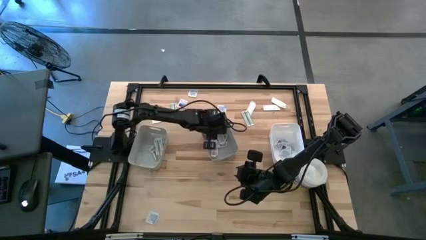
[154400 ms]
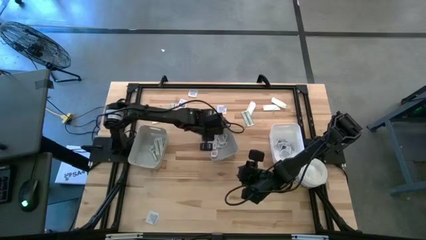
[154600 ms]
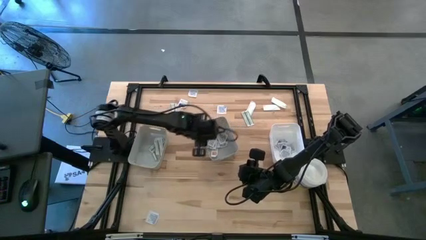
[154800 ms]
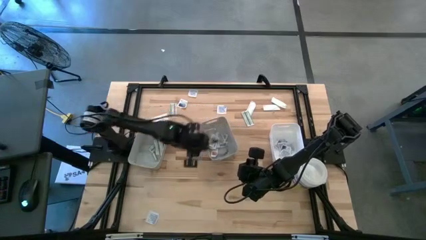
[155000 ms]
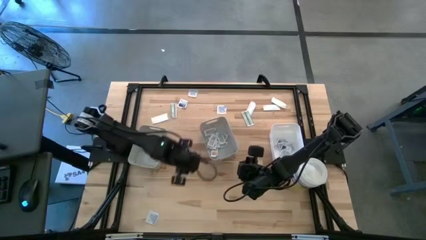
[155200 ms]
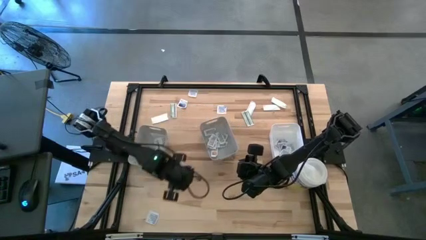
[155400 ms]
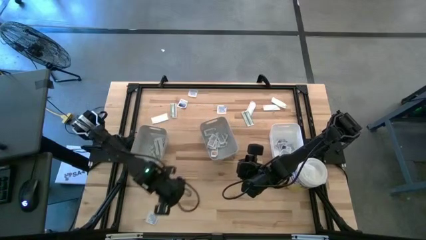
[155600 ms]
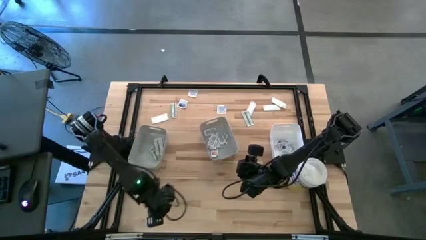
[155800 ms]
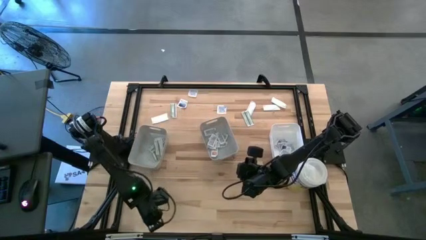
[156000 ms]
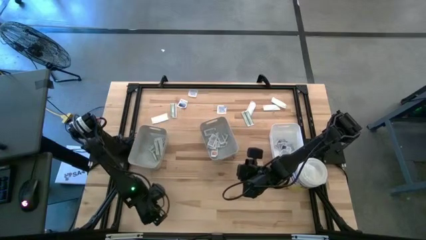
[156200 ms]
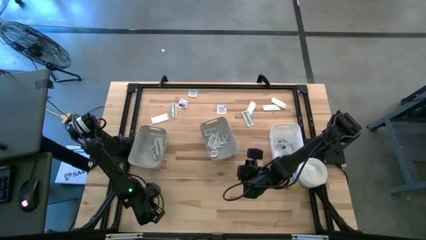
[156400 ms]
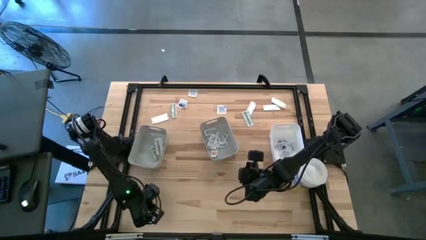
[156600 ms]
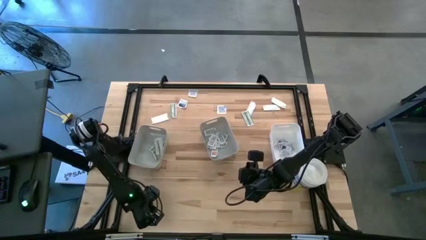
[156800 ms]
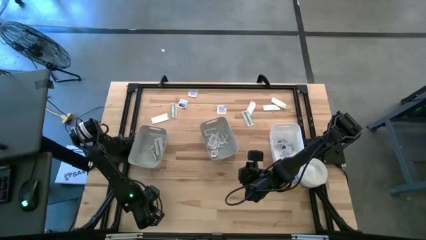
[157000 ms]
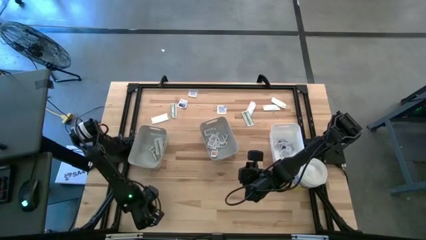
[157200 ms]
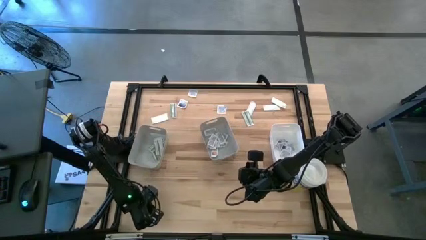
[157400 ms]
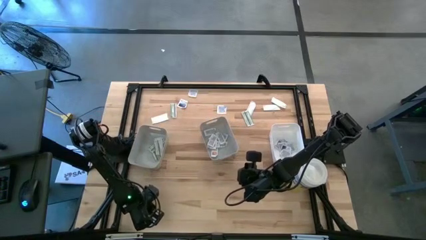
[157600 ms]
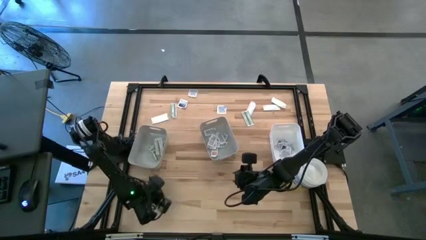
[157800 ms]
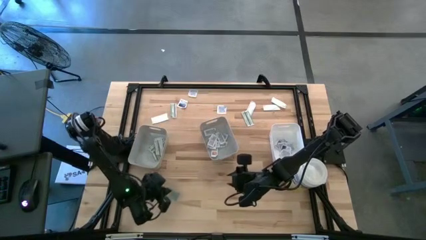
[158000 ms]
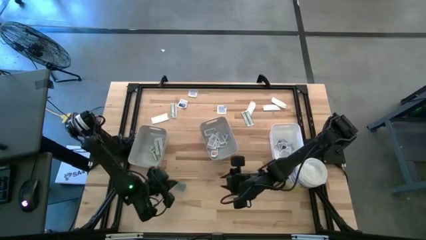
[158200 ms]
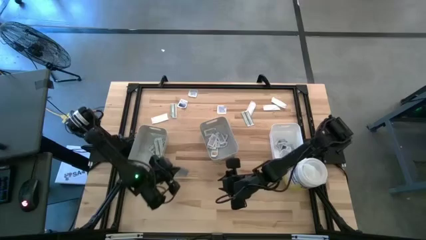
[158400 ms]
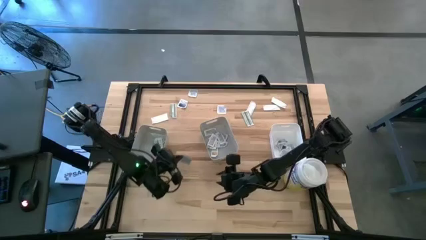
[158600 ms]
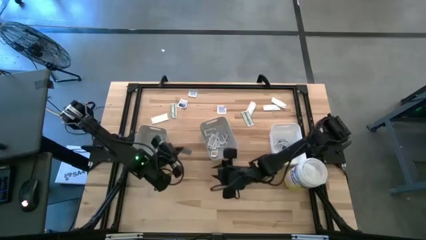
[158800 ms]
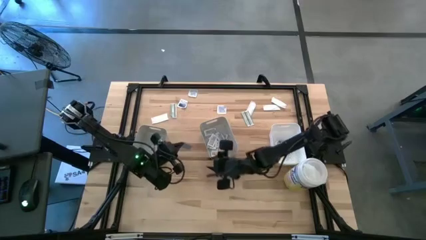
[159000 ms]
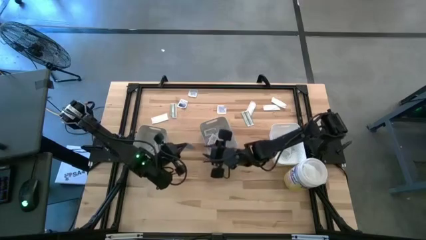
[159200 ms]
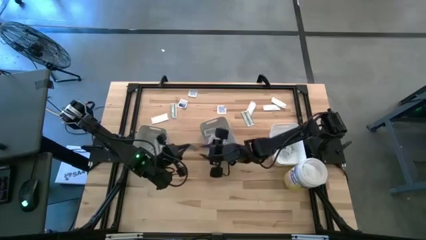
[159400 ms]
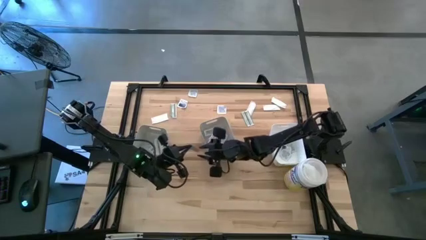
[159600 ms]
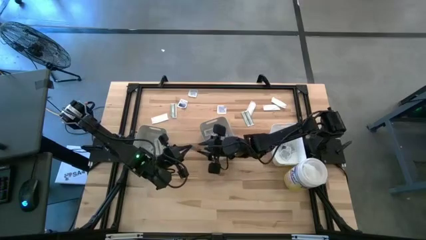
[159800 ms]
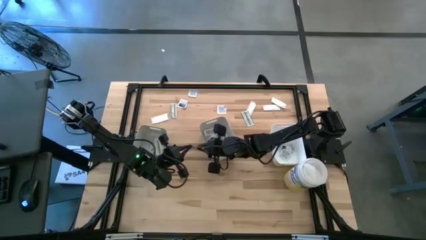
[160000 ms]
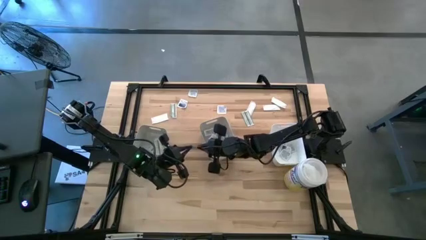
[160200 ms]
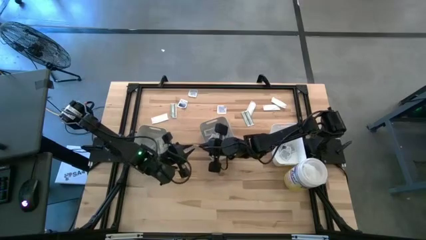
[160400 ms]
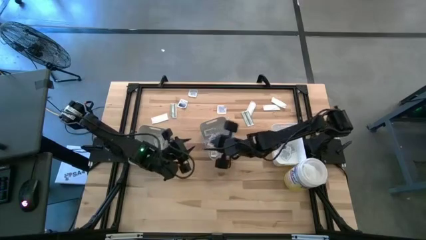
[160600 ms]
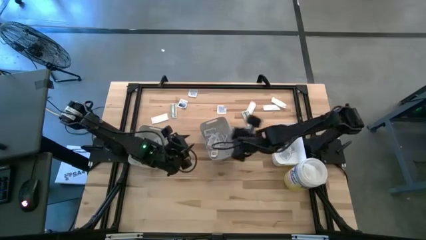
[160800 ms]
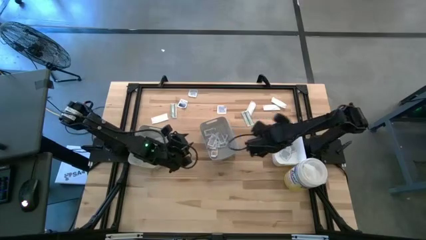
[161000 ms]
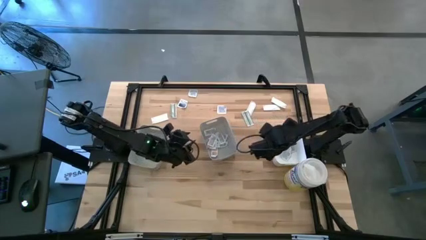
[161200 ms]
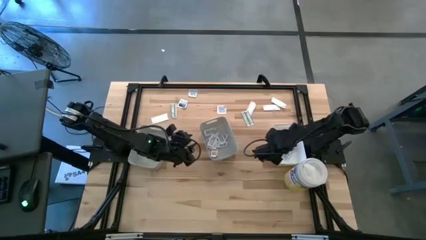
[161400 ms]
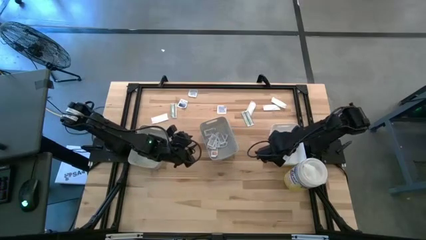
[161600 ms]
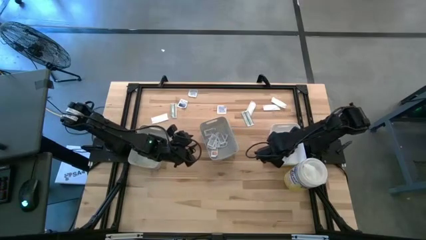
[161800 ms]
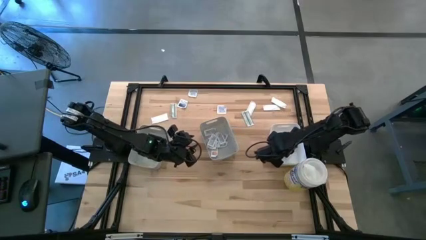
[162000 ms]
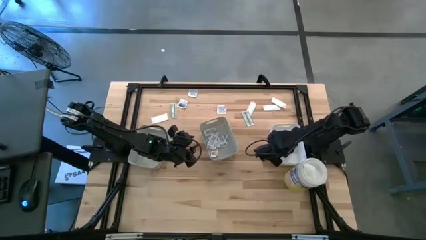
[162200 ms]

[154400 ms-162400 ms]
Task: Pick & Place First Aid Supplies
Put the alcohol pad into the white bin

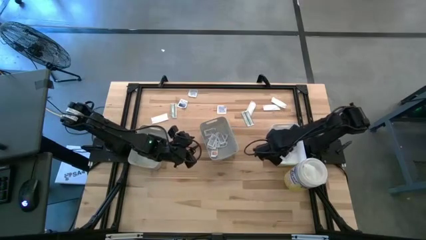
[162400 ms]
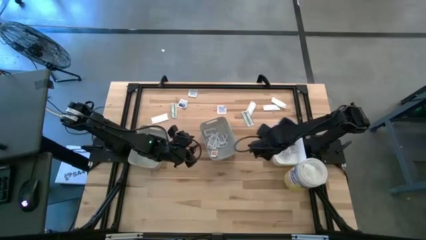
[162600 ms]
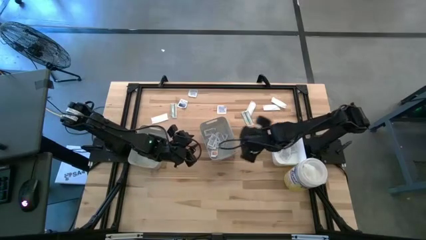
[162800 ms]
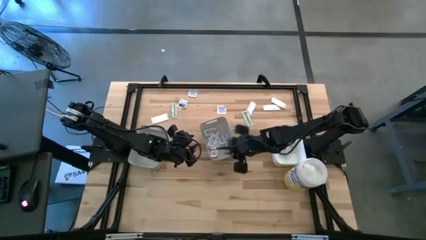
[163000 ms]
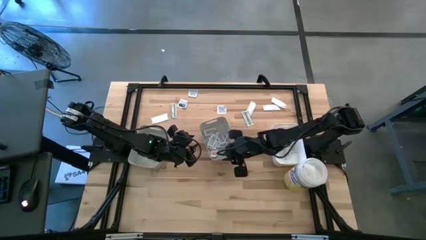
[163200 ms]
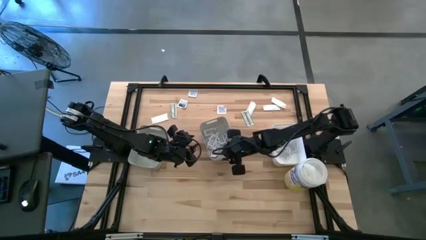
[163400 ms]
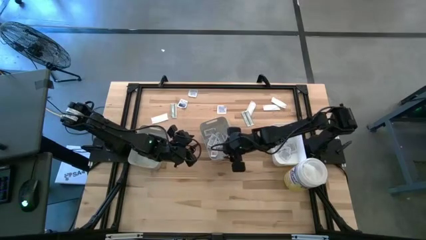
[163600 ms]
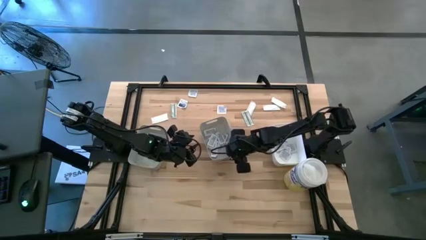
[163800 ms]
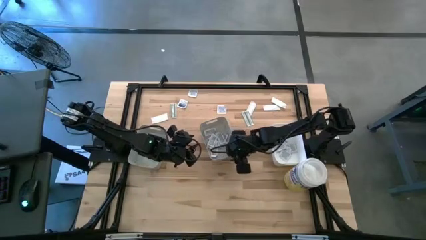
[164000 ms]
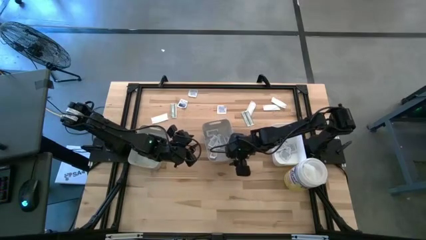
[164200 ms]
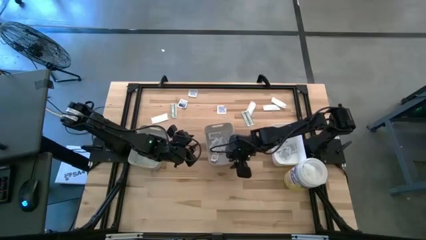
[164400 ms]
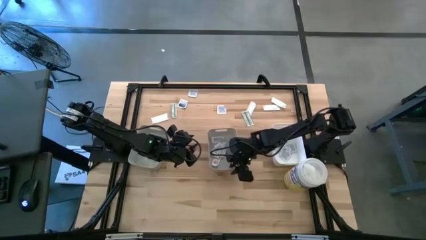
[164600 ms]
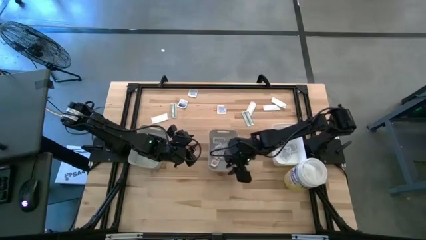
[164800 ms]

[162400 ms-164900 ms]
Adjust the right gray bin

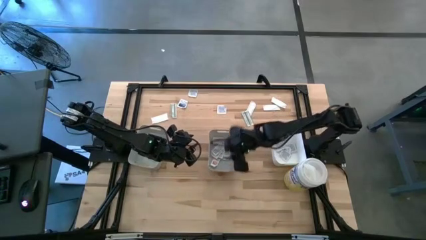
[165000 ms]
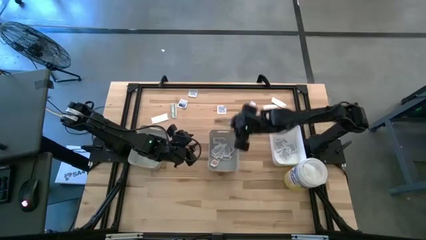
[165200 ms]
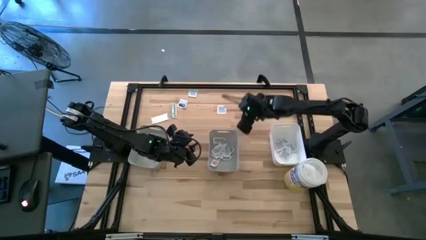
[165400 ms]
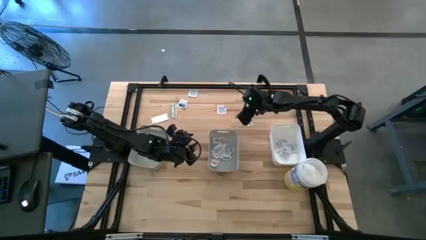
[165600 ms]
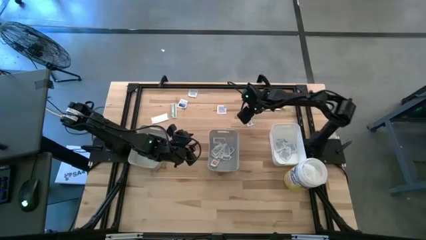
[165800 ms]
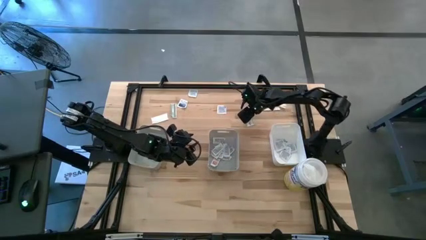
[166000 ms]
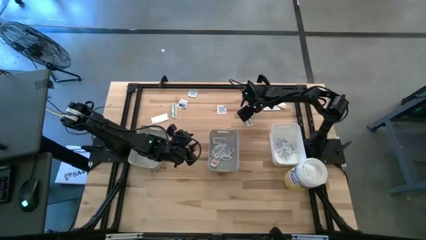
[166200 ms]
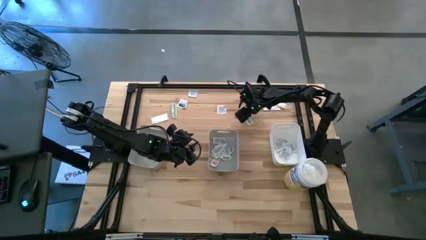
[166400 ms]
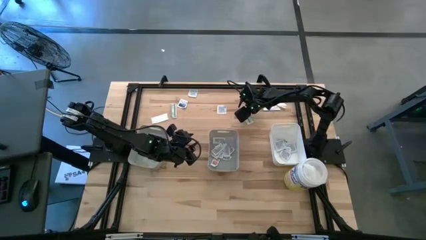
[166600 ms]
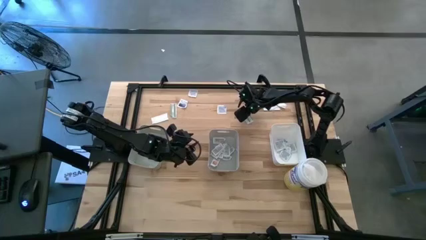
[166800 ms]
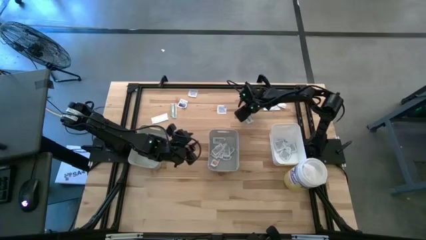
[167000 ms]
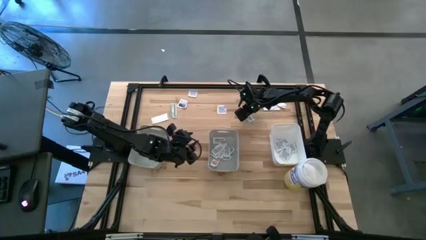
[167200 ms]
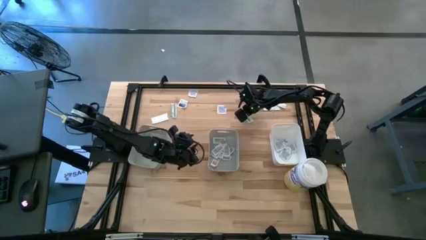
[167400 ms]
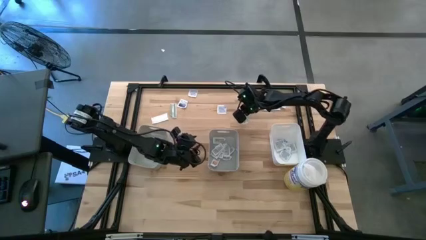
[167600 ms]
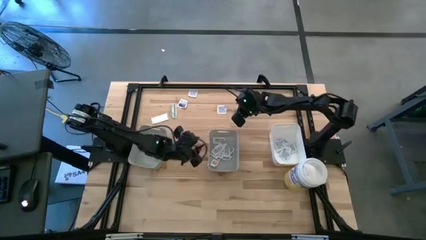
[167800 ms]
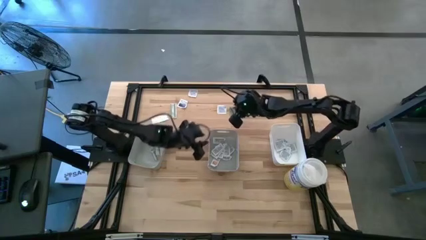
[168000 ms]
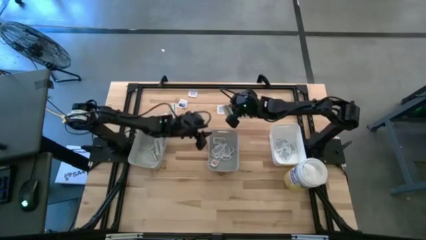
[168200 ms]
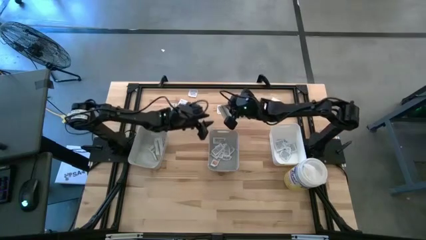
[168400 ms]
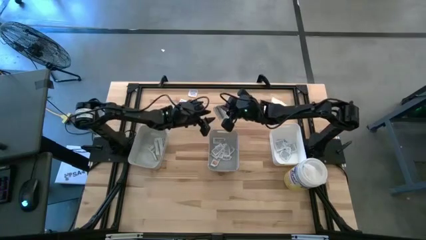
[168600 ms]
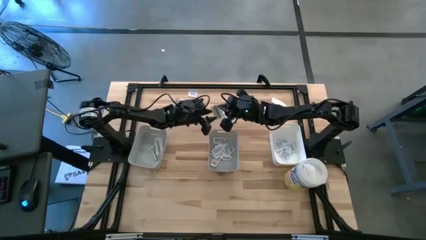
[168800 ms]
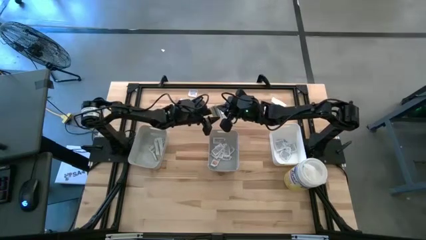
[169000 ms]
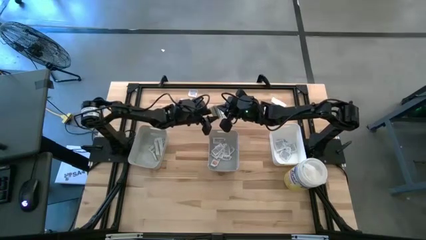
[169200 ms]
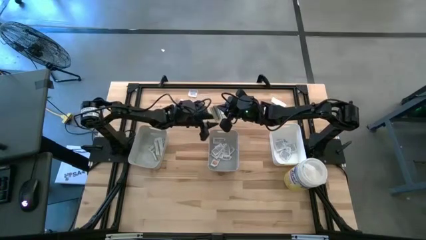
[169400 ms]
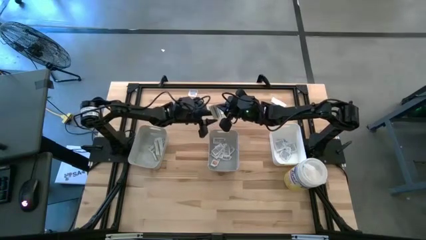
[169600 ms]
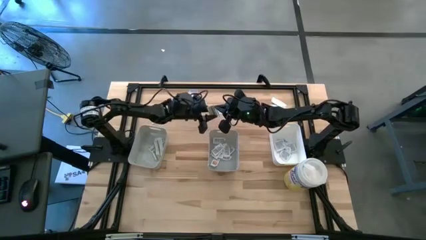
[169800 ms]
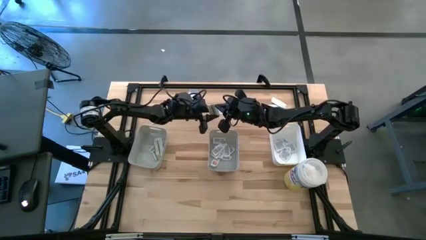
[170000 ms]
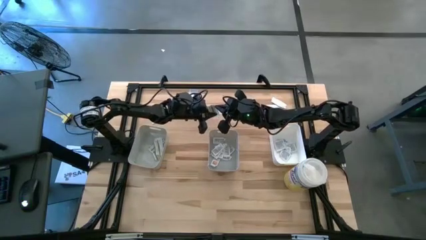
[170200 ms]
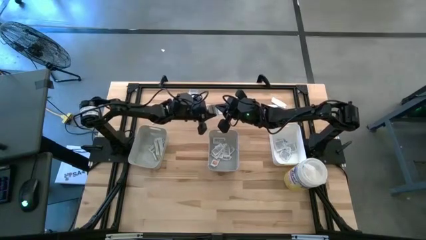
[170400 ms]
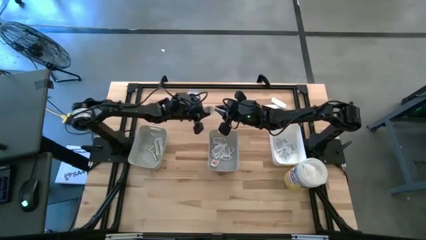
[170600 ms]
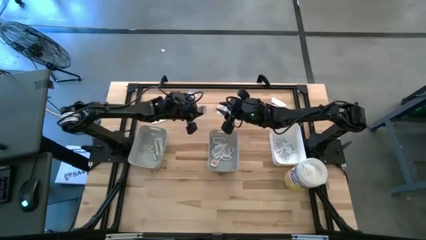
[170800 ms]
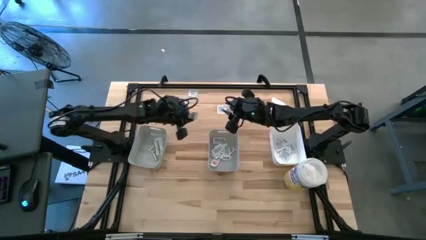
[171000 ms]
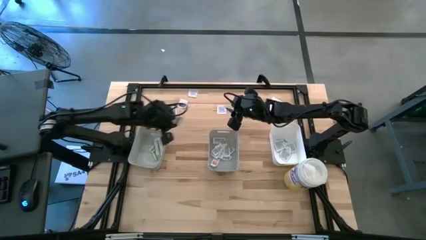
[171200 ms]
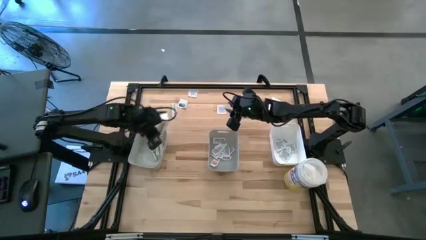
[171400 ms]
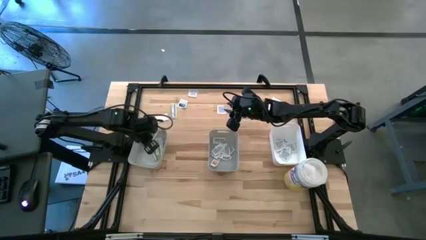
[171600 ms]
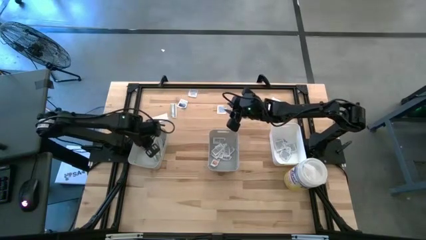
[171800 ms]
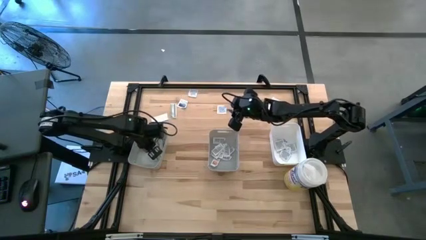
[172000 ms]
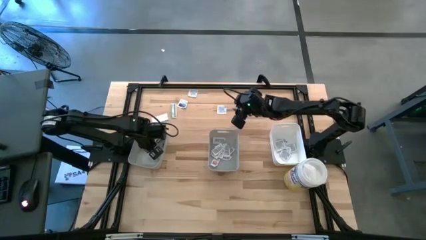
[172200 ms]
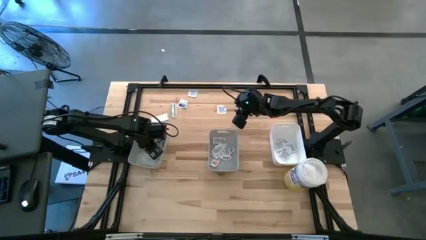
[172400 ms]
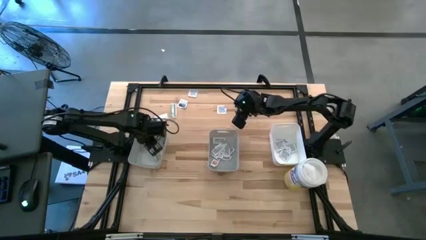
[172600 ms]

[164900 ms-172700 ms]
Put the bandage pack into the left gray bin
